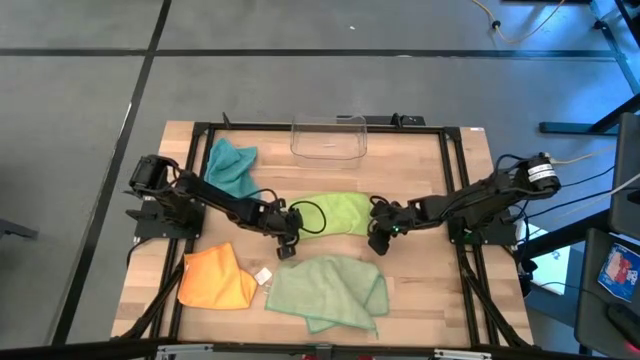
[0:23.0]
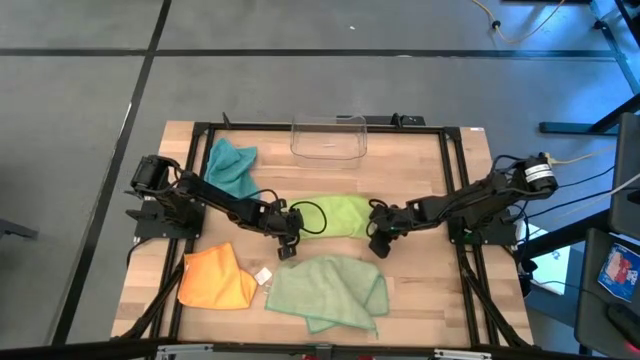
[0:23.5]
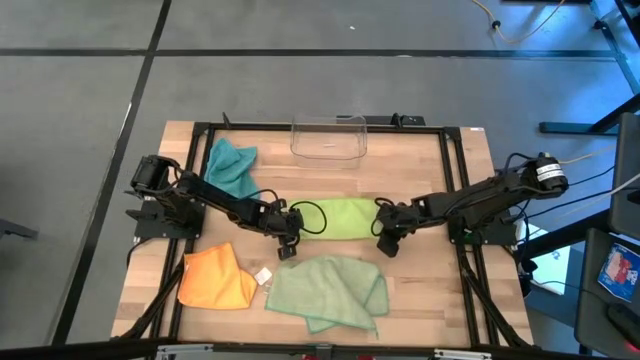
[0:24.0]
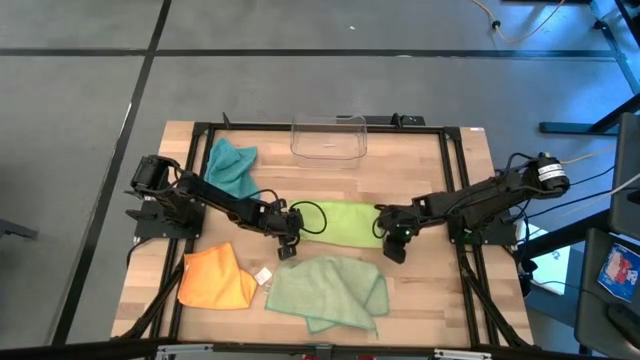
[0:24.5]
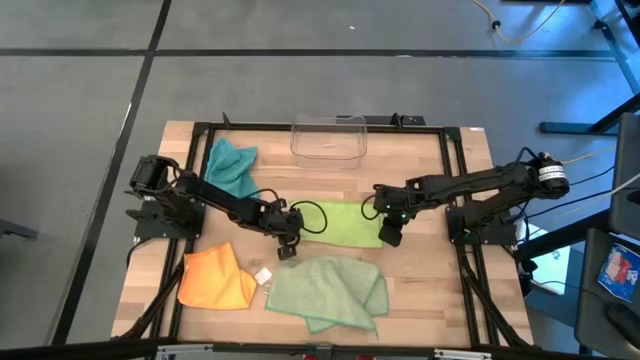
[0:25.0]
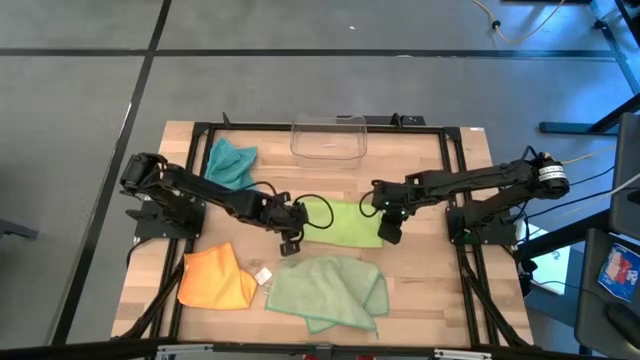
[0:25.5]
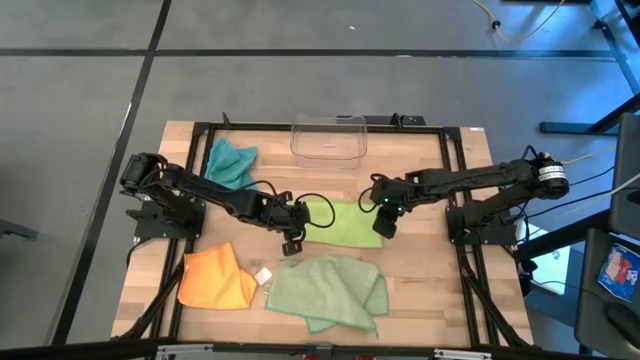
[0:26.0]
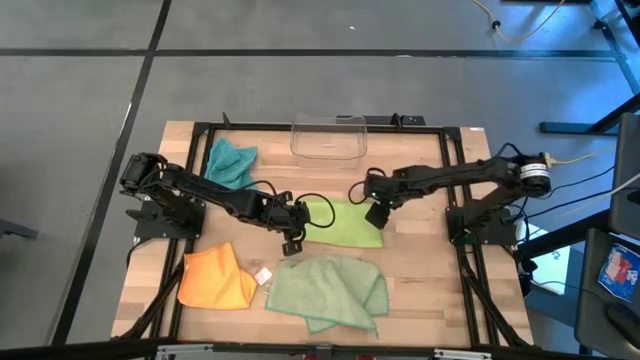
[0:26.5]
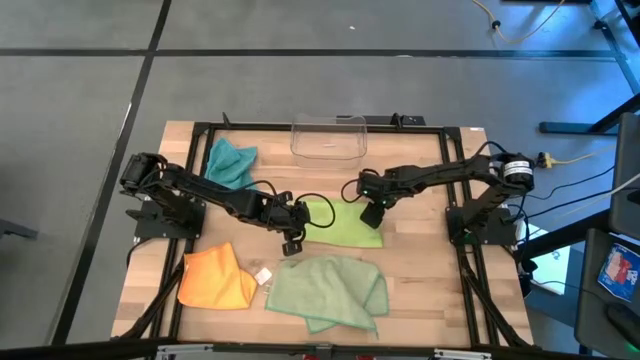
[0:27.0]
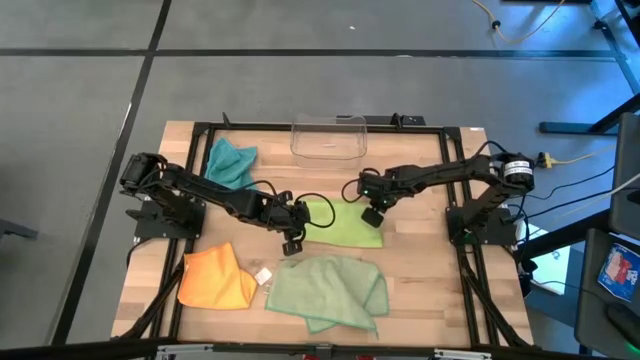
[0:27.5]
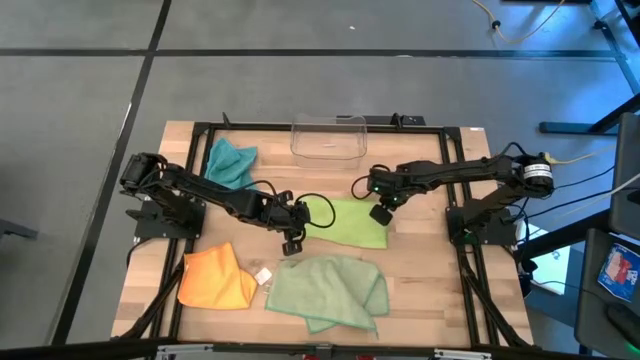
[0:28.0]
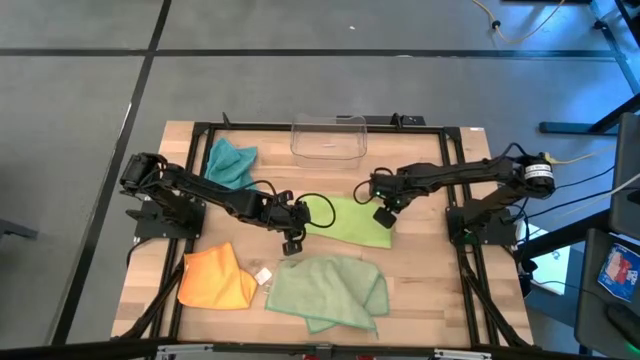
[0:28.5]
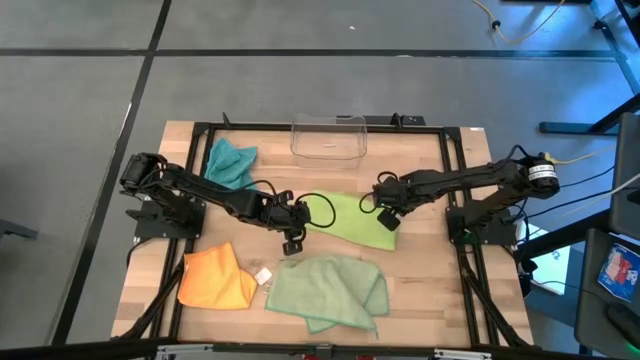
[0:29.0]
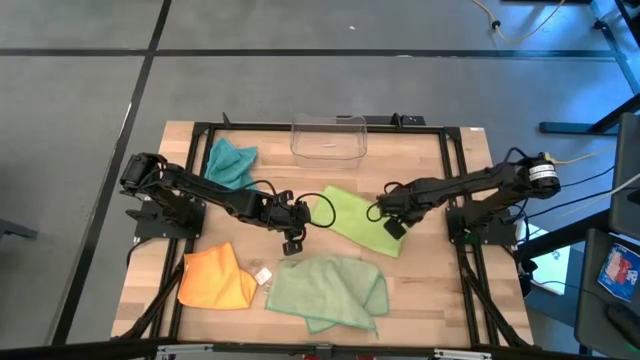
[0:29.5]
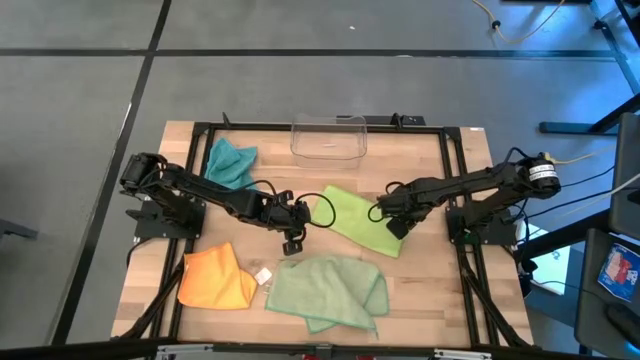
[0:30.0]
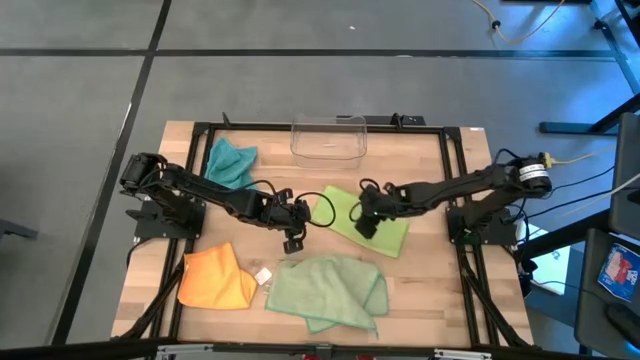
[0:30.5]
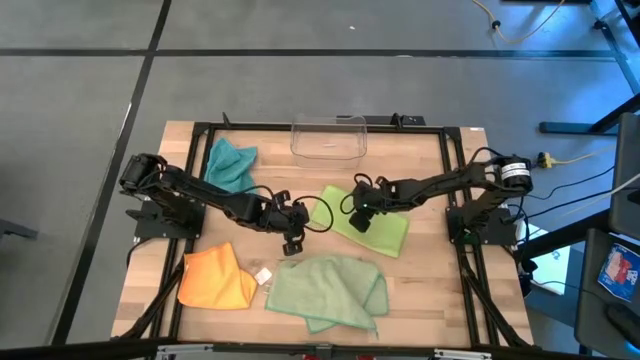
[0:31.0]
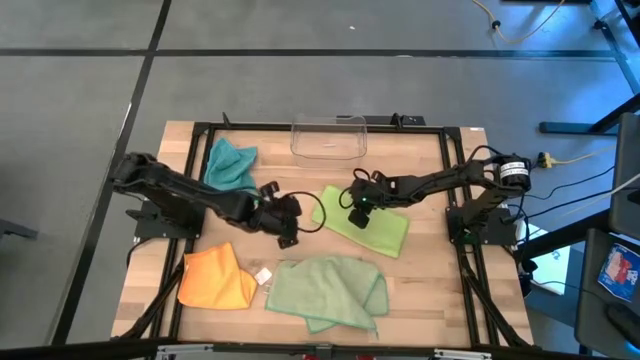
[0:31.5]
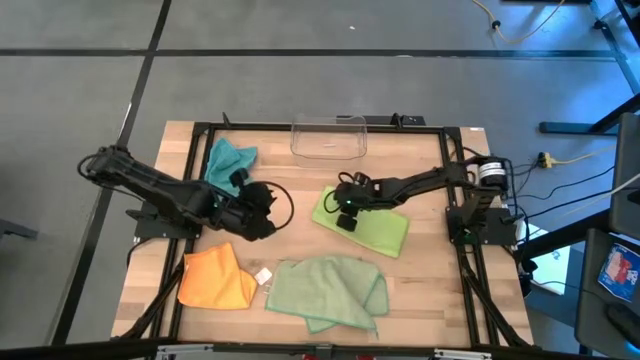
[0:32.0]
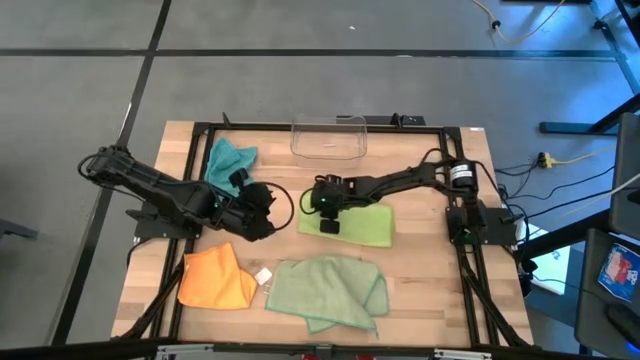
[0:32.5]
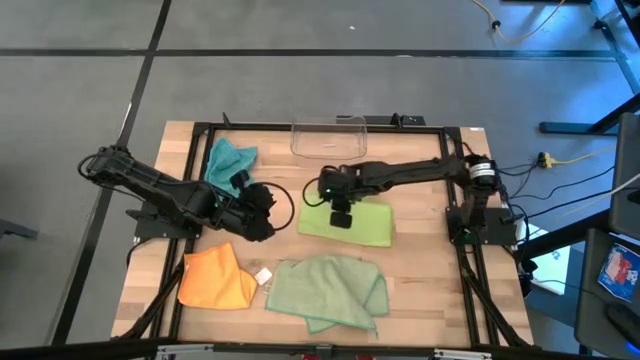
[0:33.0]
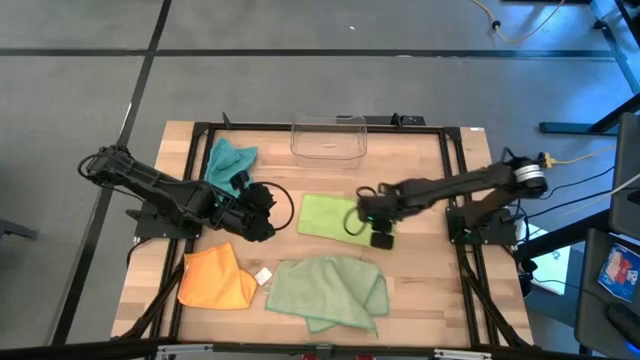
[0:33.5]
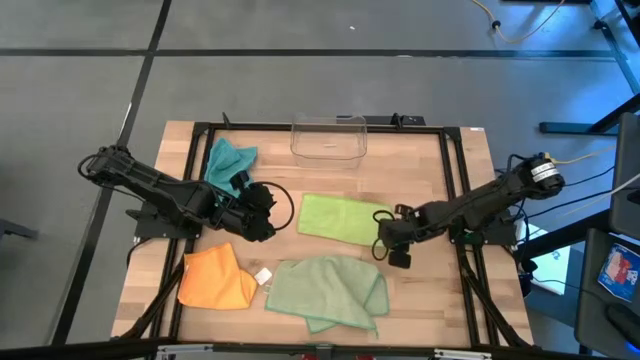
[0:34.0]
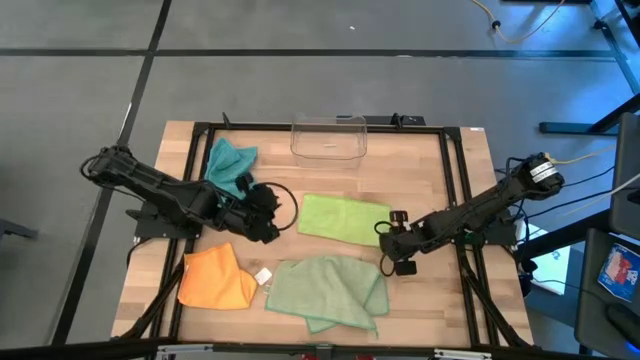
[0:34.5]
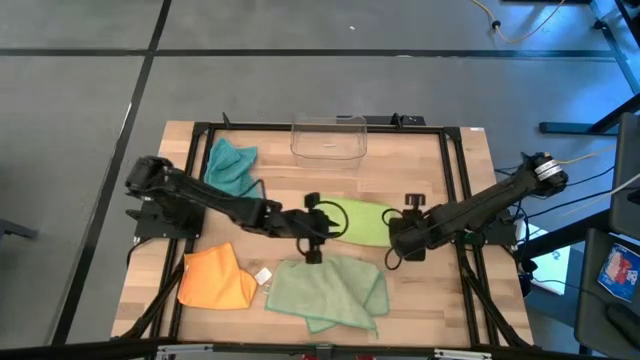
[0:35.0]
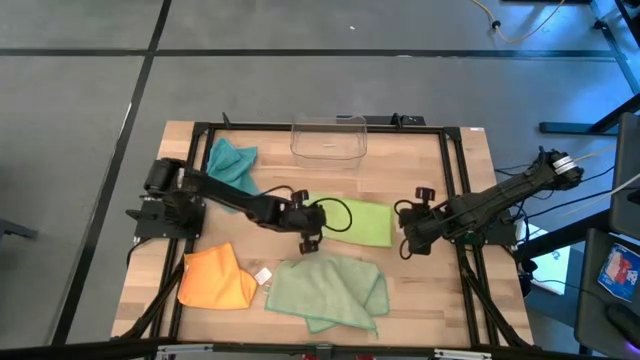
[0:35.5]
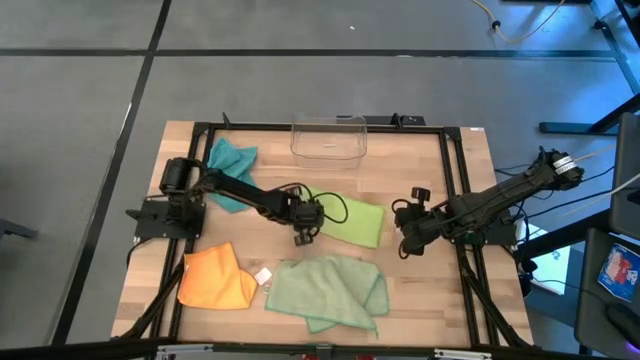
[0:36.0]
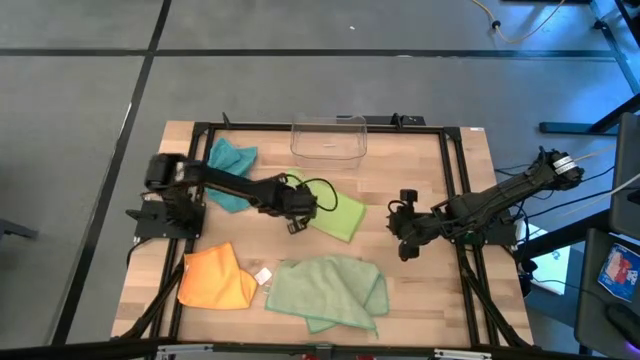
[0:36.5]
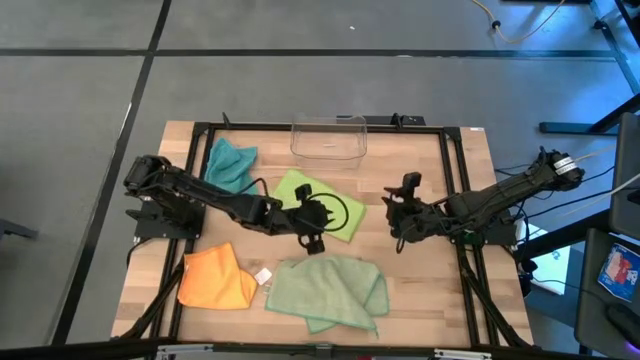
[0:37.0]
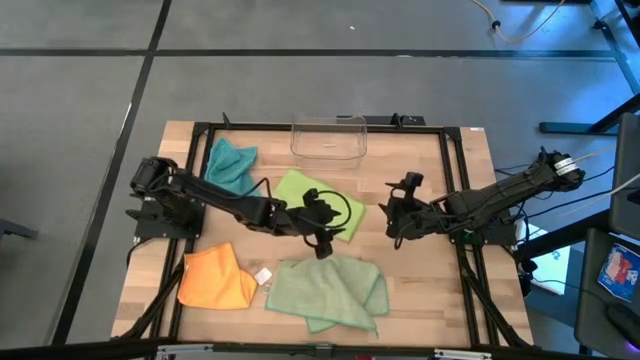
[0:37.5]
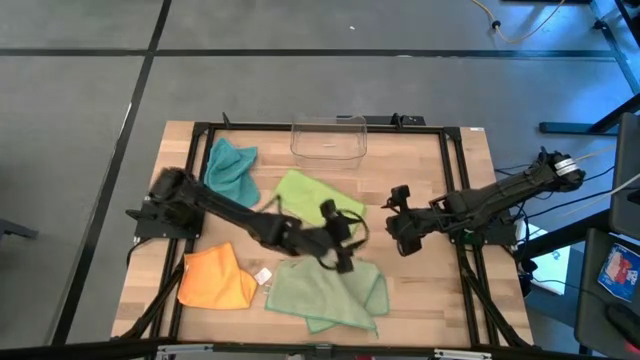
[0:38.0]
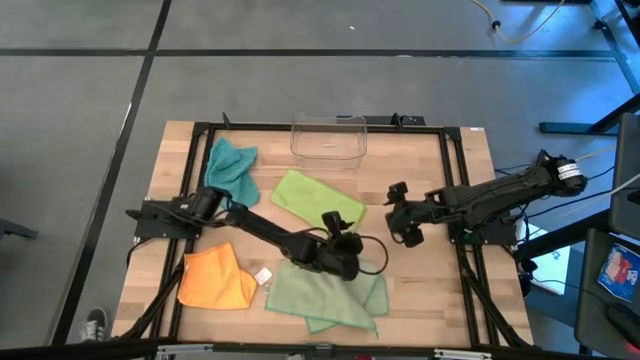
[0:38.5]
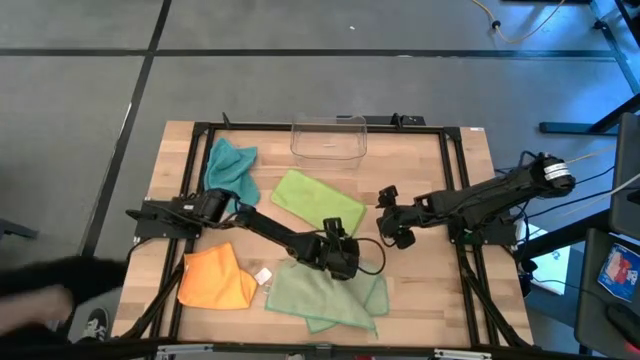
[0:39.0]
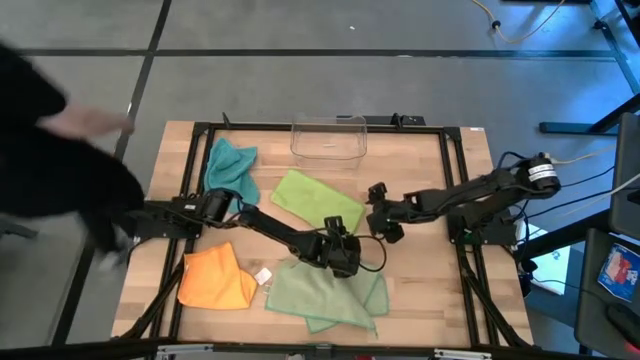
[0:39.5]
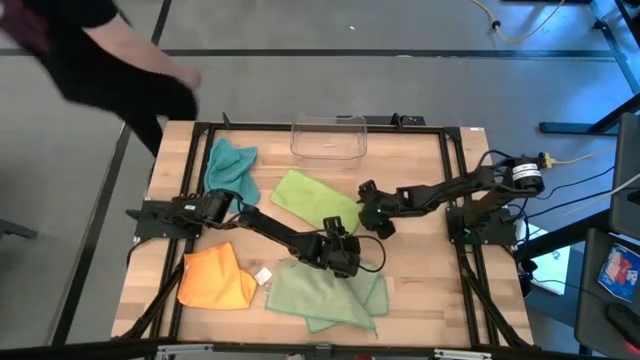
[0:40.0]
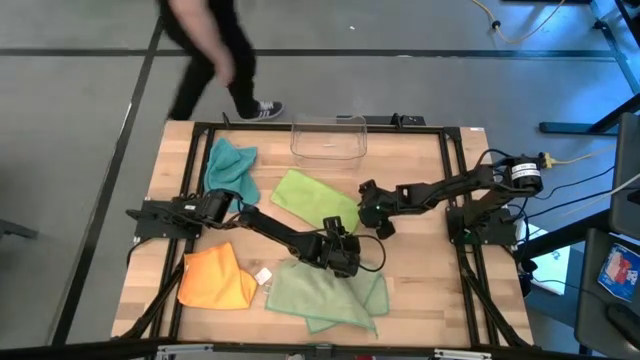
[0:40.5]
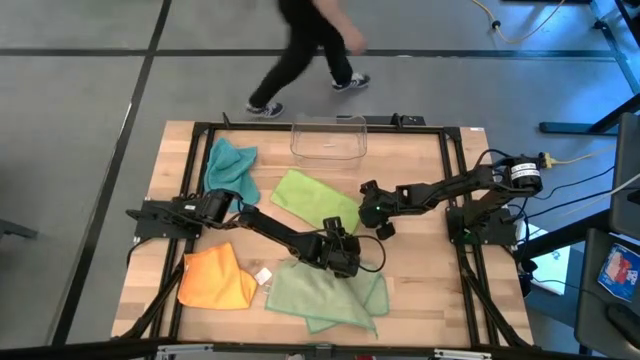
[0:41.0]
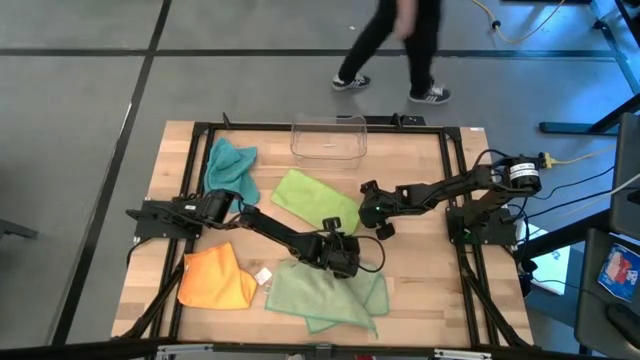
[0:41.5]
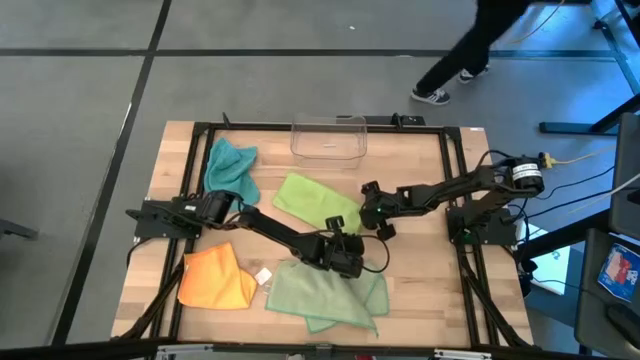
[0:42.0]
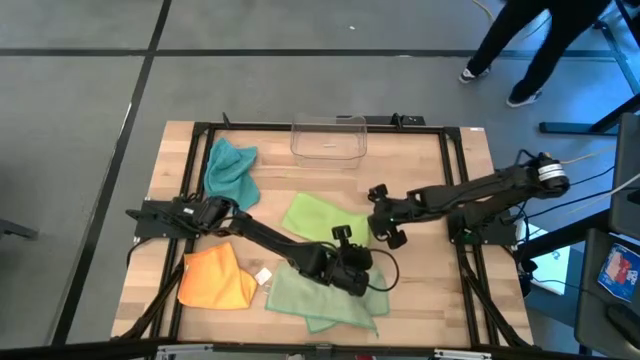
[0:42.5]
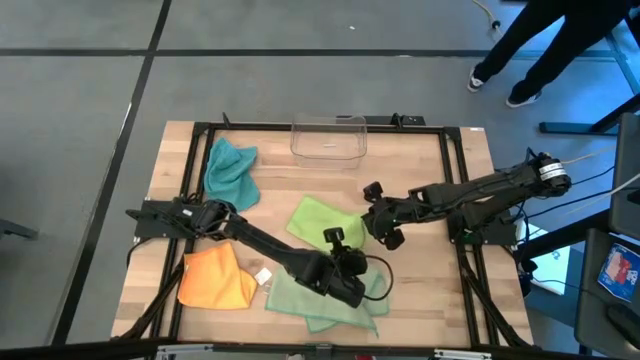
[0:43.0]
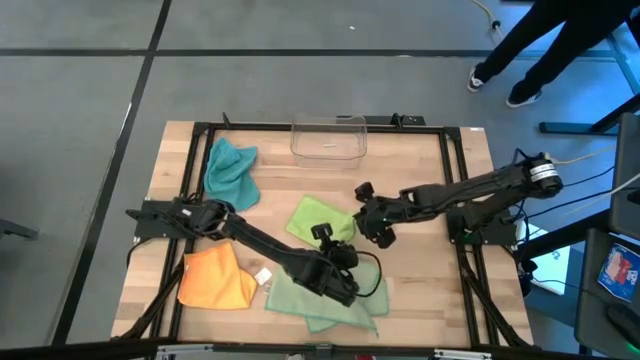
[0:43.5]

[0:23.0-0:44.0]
Task: Fold microfiber towels
Fold the light green microfiber towel
